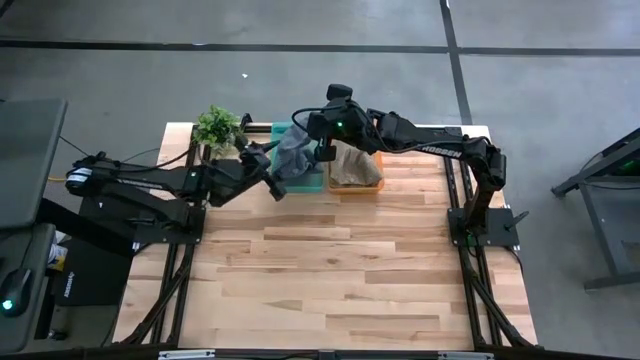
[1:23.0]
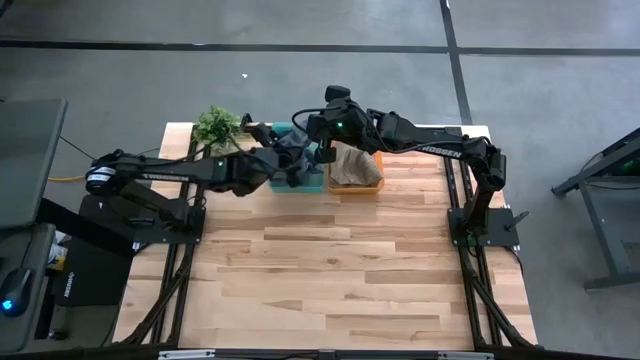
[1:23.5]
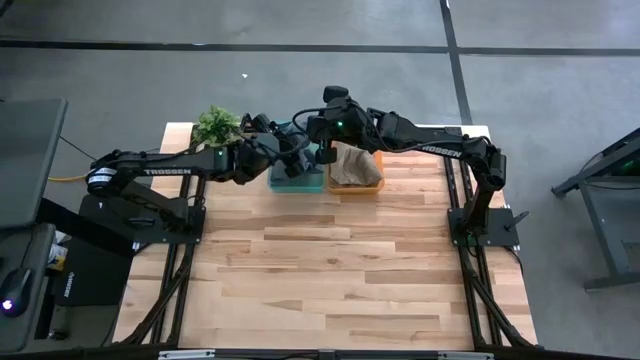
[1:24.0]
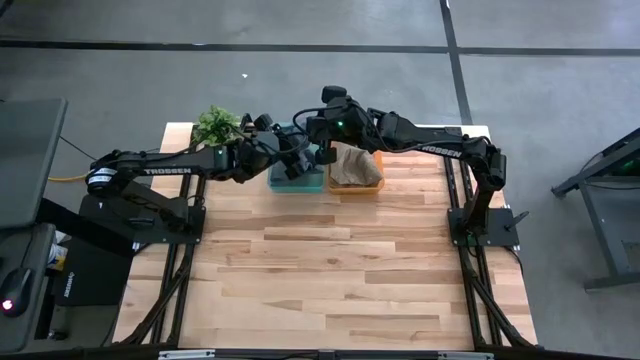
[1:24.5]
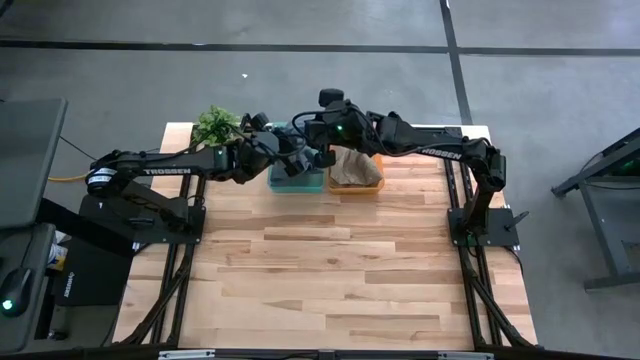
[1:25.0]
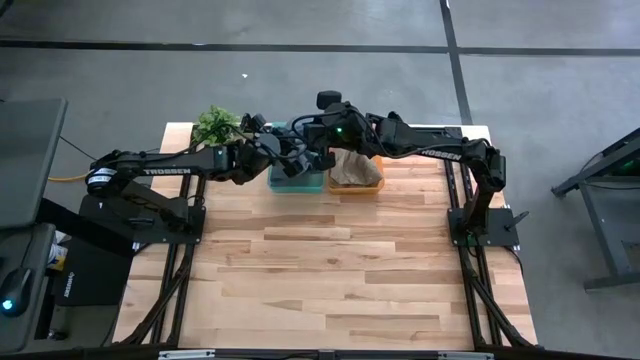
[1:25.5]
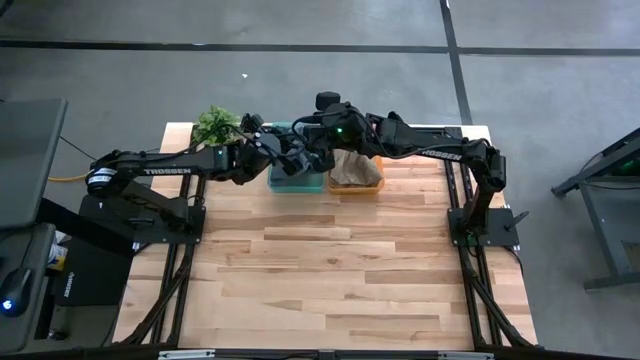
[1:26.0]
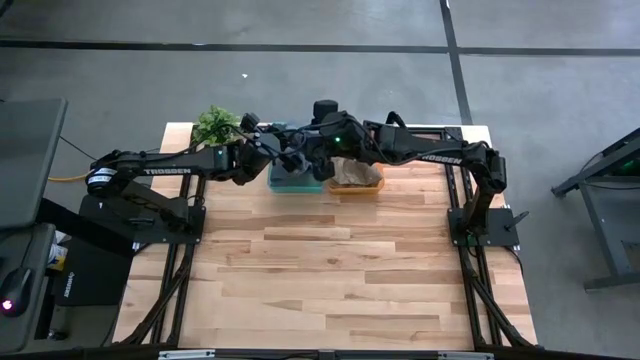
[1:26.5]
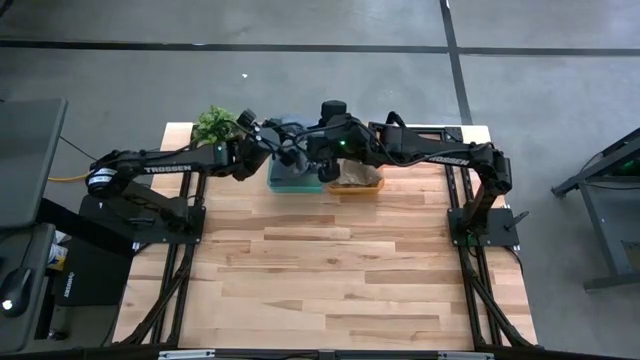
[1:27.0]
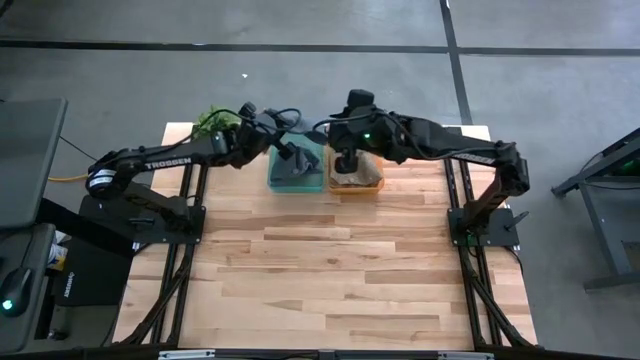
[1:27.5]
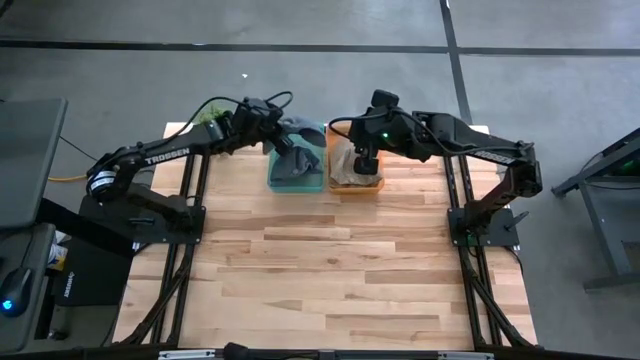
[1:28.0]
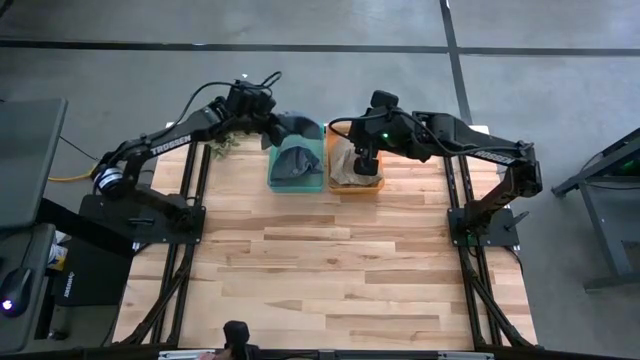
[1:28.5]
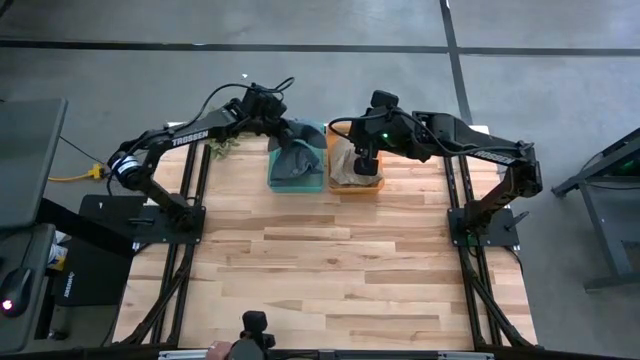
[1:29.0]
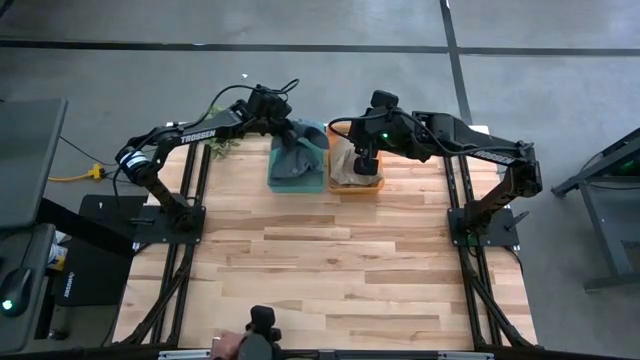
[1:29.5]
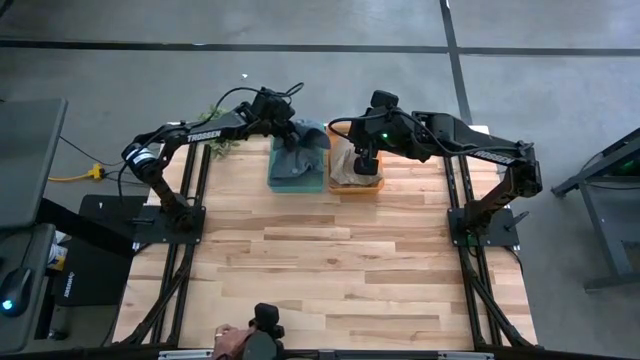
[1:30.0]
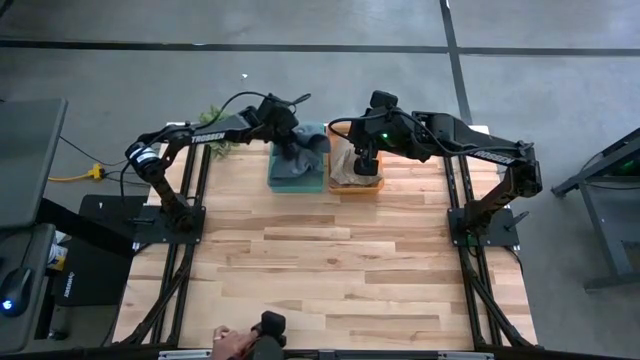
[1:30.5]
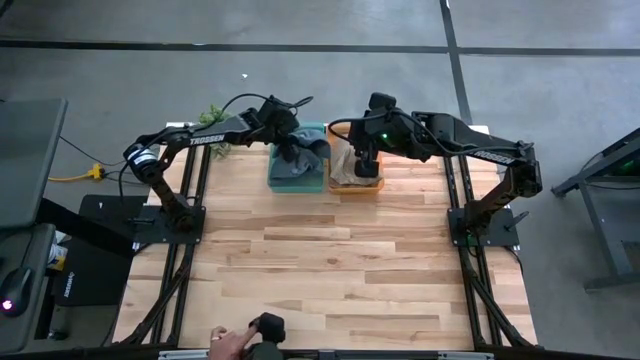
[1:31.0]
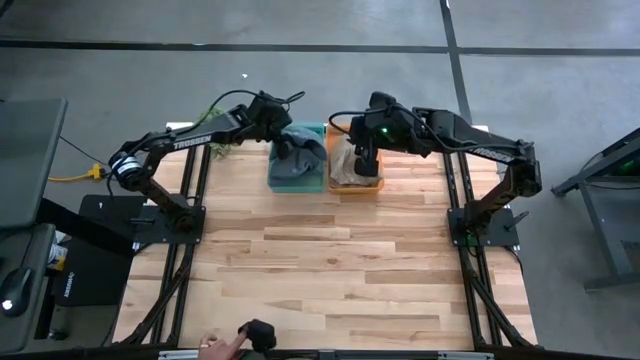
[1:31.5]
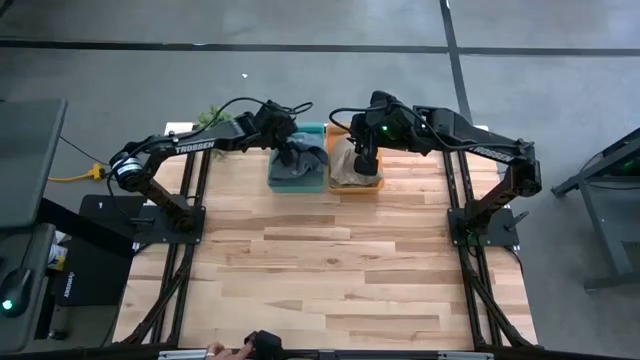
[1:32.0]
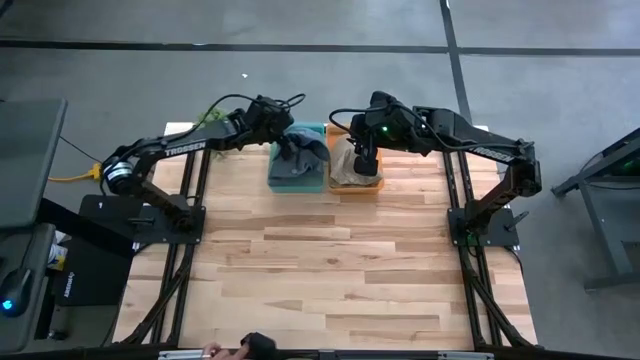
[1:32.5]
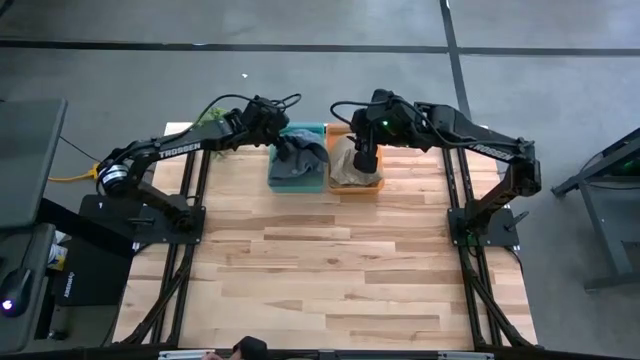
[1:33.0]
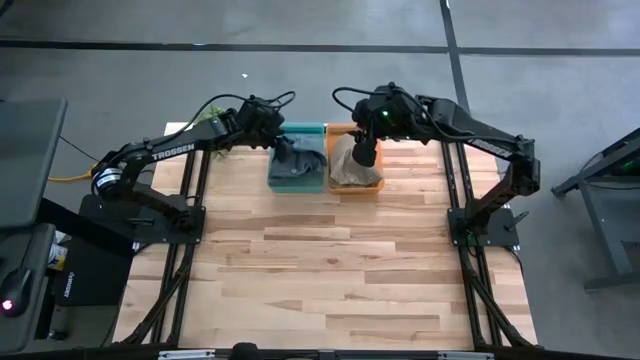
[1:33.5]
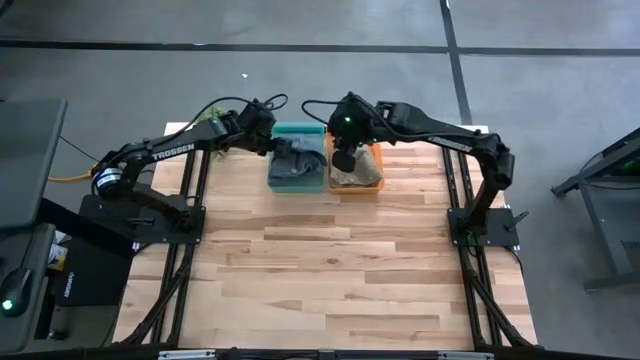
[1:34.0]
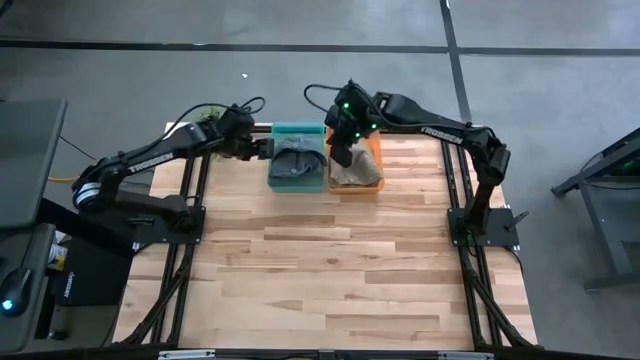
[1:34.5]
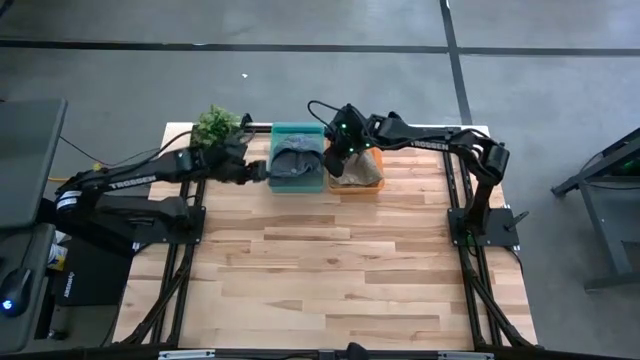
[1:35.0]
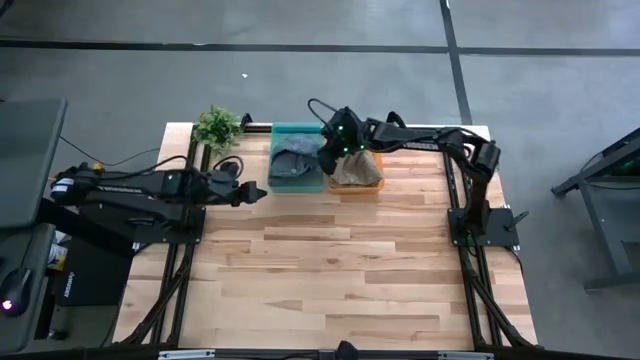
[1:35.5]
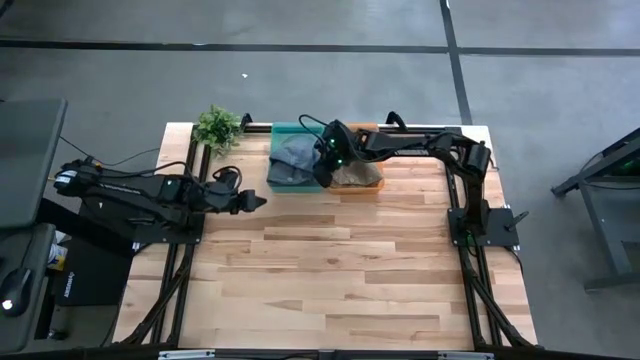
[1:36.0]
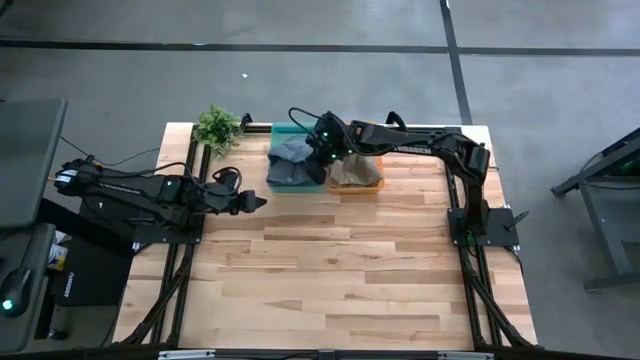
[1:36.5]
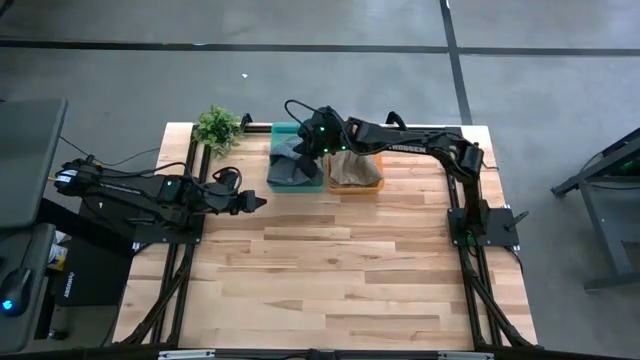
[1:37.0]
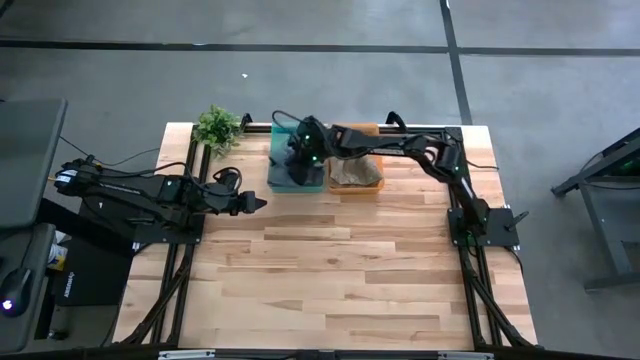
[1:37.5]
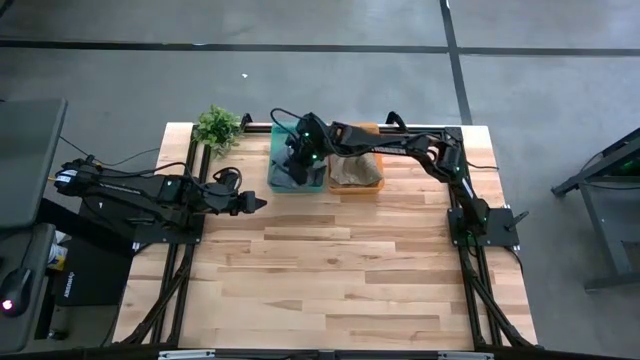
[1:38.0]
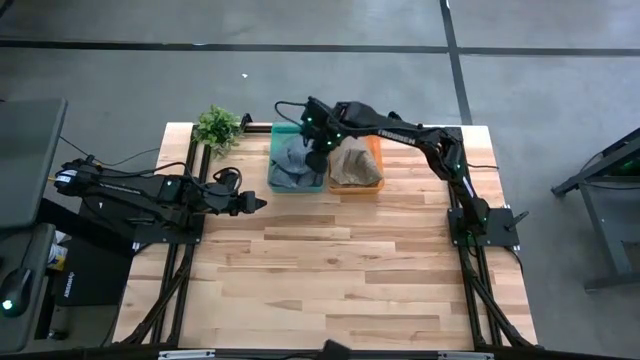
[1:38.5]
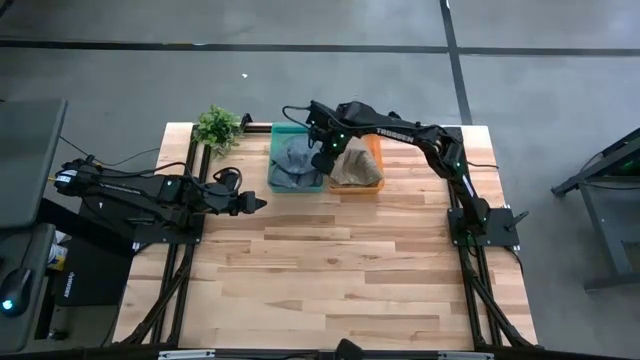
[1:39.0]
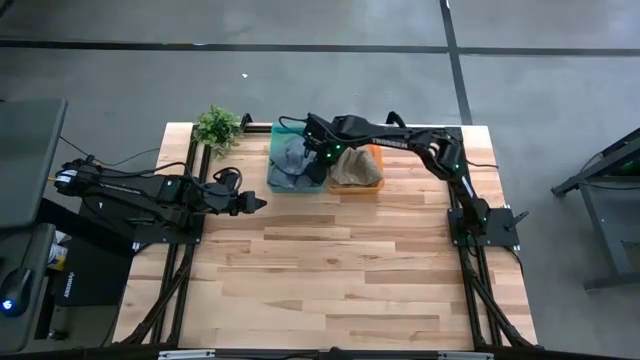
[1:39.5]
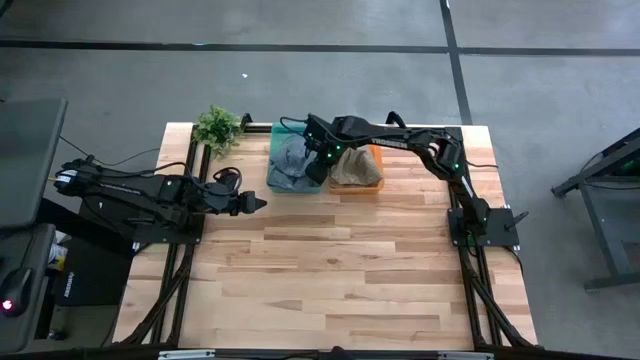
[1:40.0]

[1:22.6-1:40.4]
Task: Pick & Place hat
Put the blue cap into the green bin

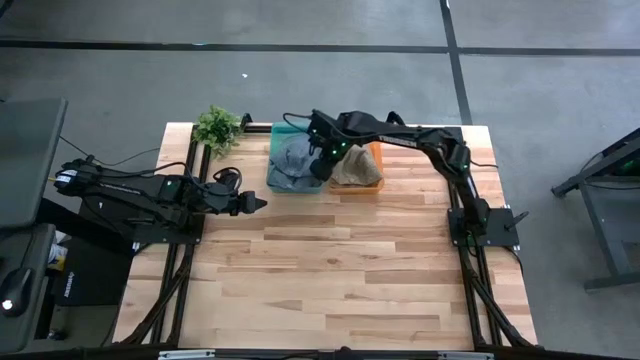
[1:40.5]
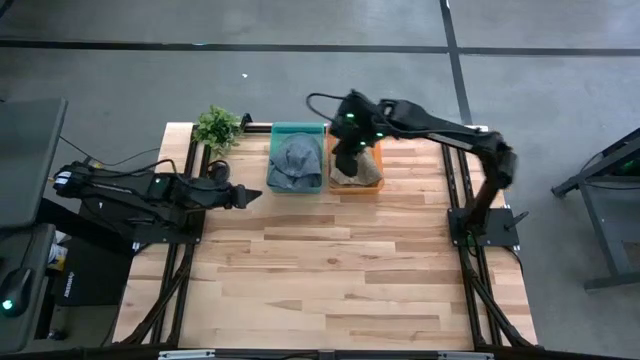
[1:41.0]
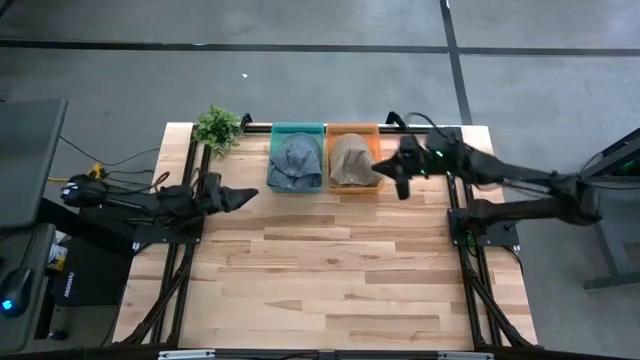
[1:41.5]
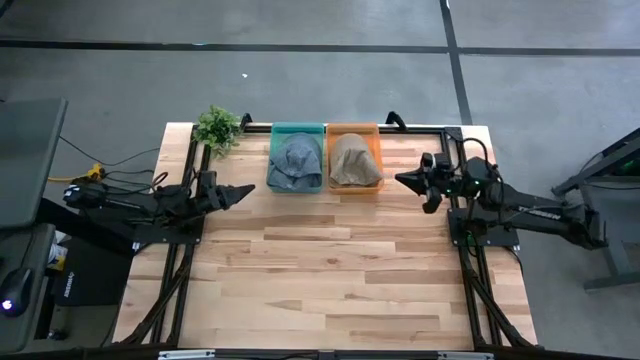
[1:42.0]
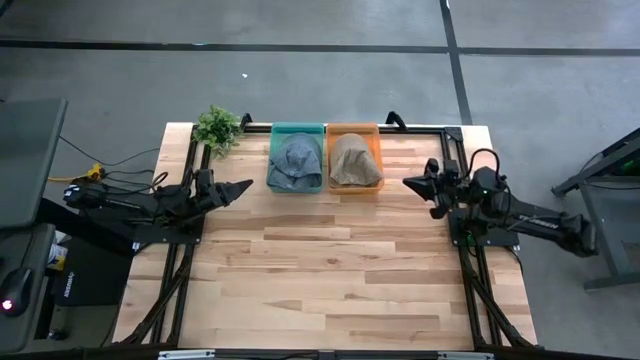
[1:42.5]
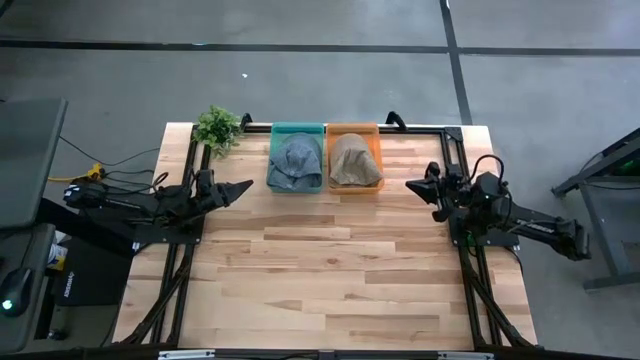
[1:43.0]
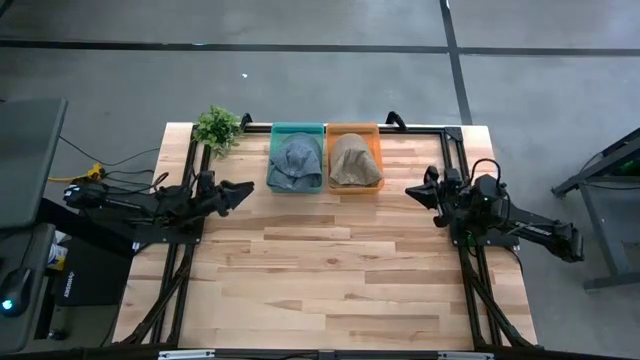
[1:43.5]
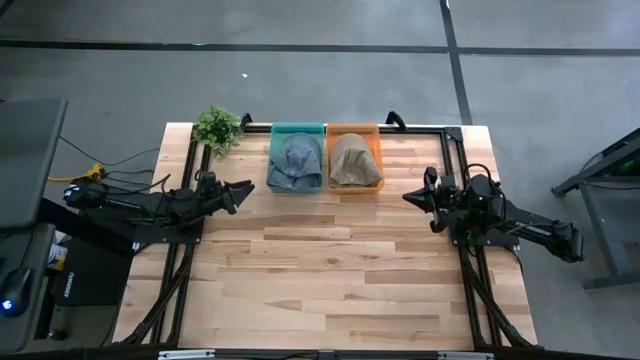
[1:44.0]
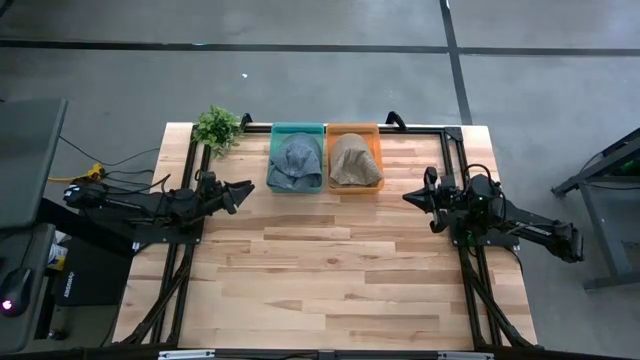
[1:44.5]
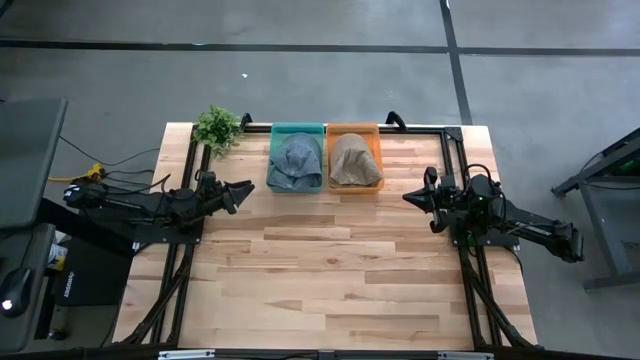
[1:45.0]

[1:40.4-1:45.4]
Return to home position
